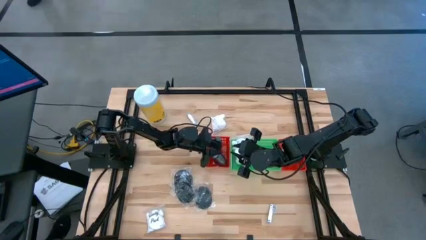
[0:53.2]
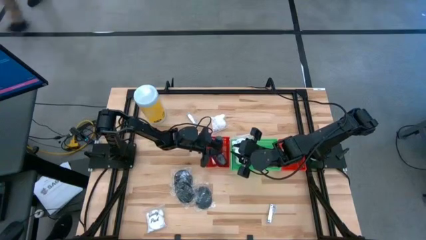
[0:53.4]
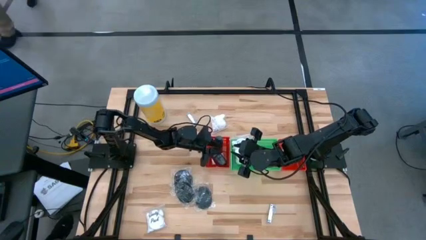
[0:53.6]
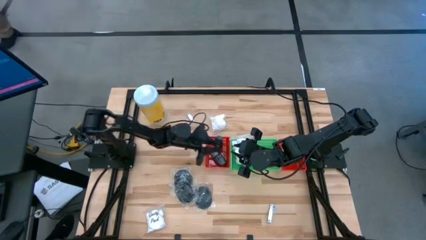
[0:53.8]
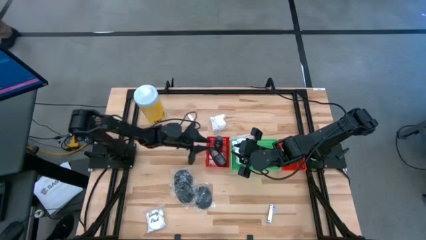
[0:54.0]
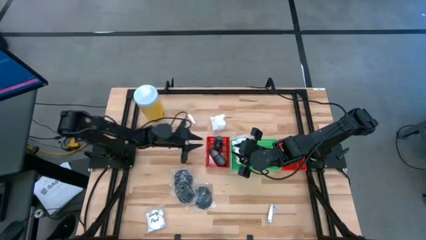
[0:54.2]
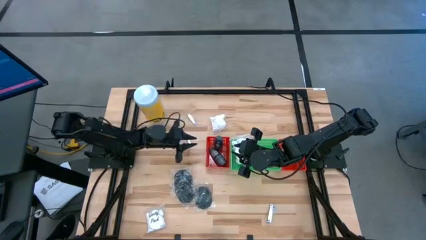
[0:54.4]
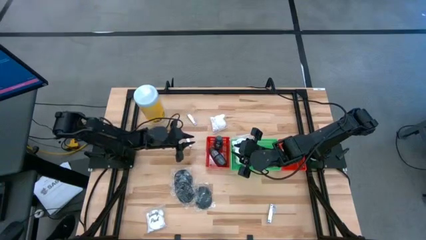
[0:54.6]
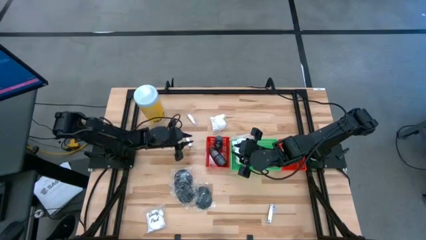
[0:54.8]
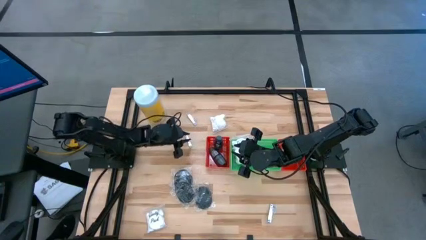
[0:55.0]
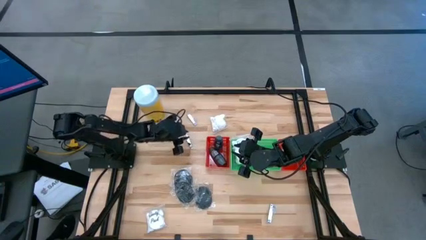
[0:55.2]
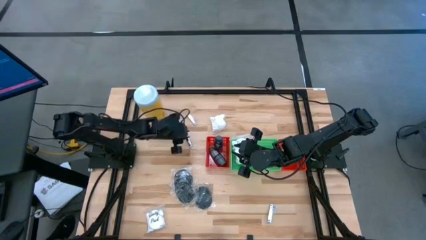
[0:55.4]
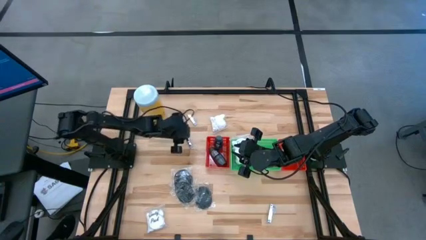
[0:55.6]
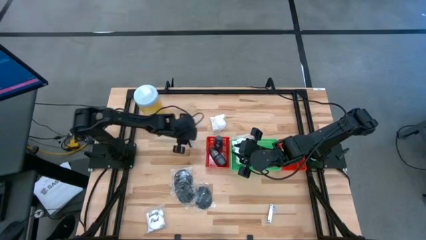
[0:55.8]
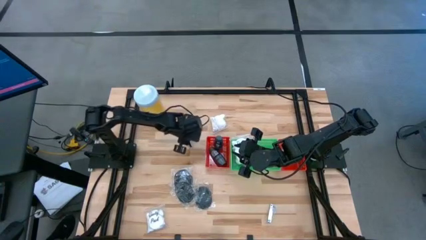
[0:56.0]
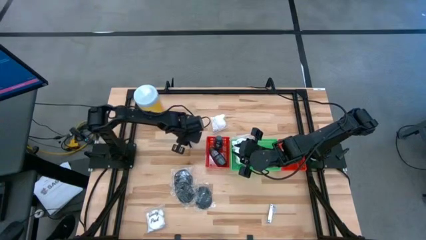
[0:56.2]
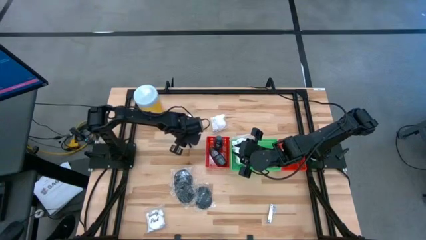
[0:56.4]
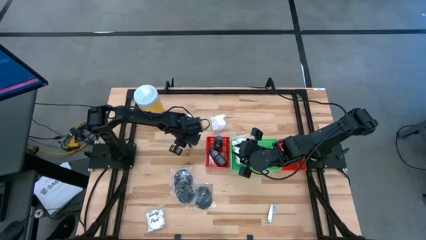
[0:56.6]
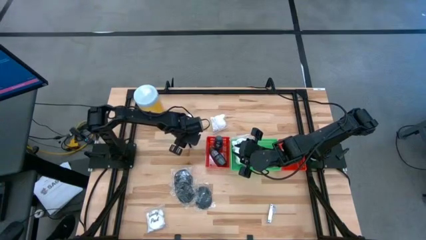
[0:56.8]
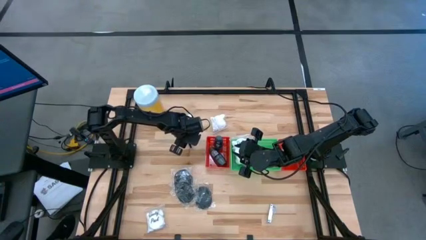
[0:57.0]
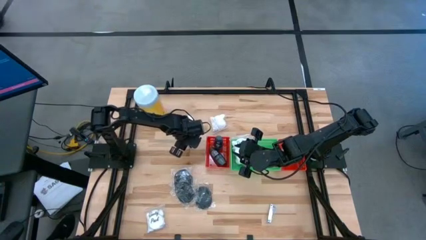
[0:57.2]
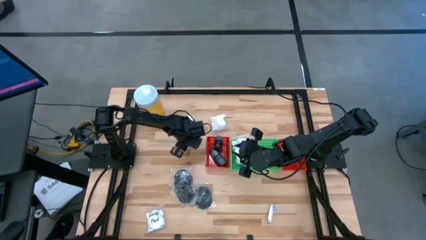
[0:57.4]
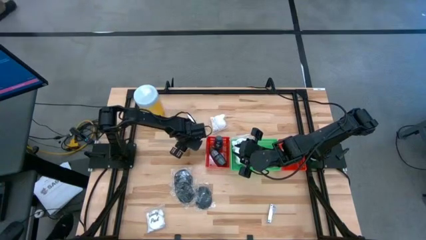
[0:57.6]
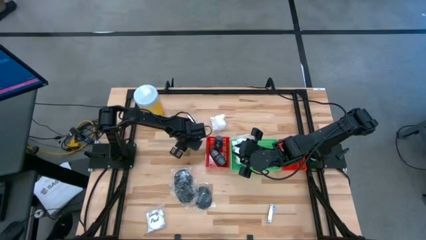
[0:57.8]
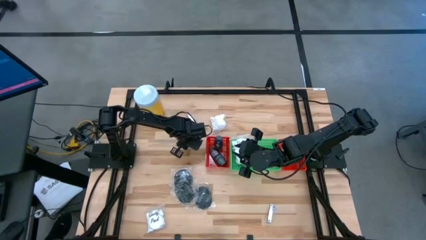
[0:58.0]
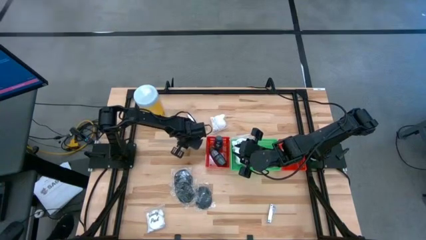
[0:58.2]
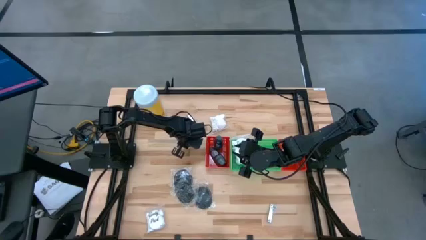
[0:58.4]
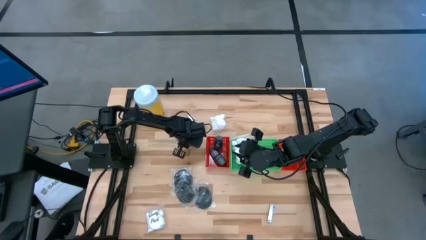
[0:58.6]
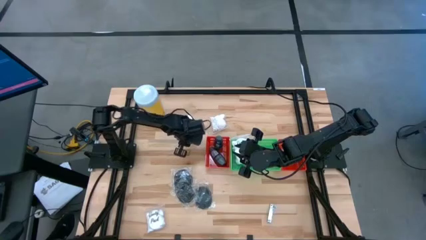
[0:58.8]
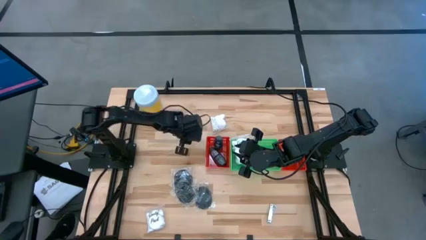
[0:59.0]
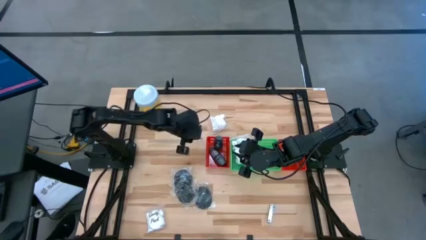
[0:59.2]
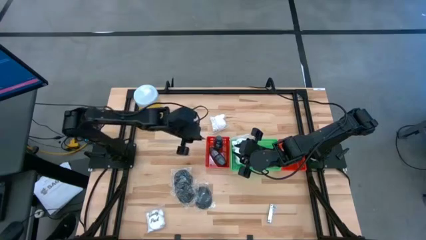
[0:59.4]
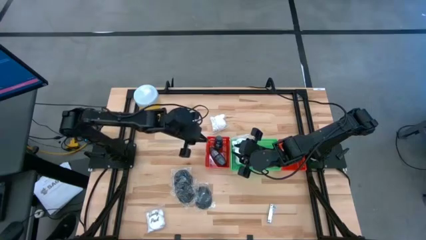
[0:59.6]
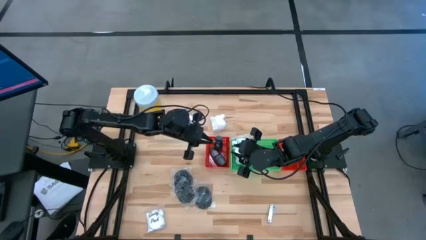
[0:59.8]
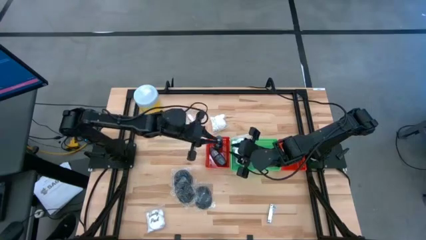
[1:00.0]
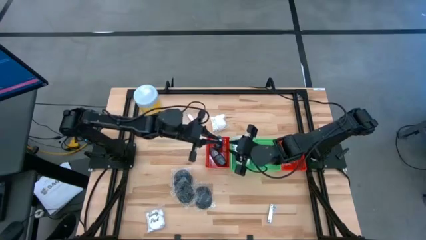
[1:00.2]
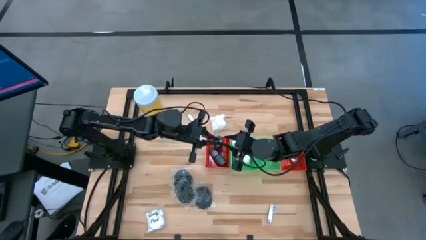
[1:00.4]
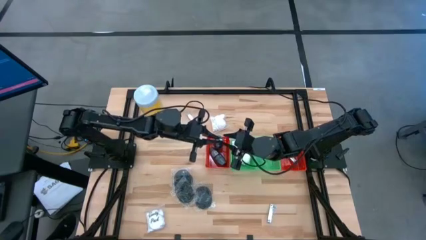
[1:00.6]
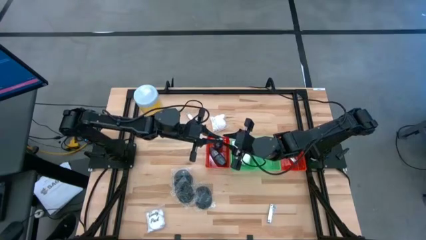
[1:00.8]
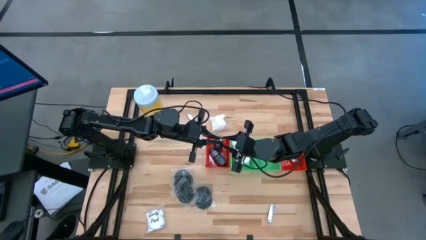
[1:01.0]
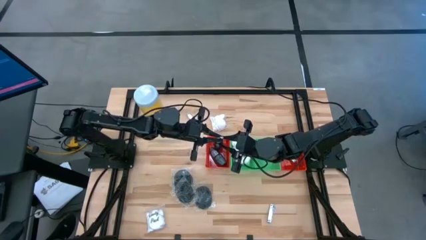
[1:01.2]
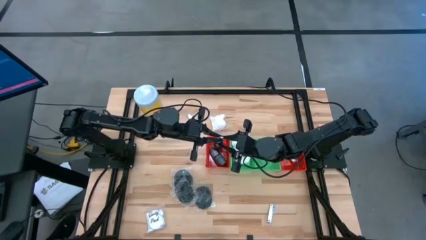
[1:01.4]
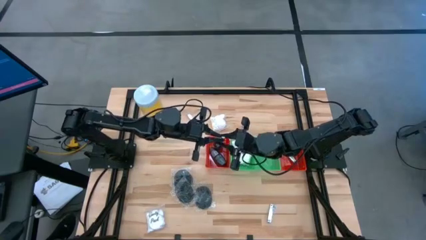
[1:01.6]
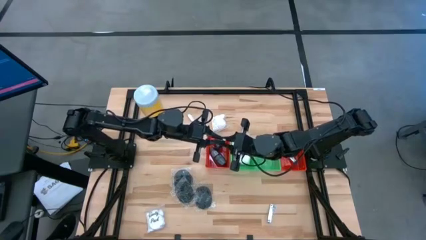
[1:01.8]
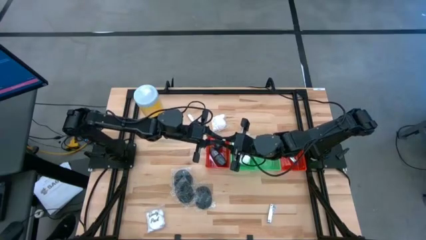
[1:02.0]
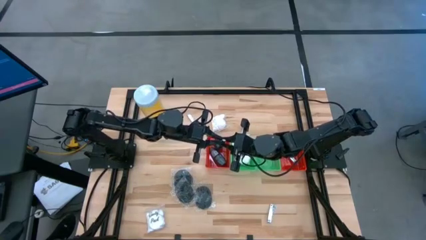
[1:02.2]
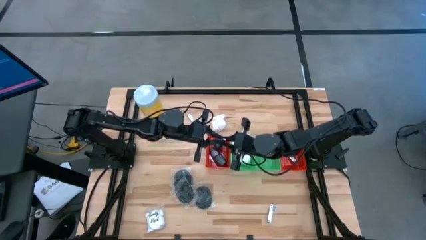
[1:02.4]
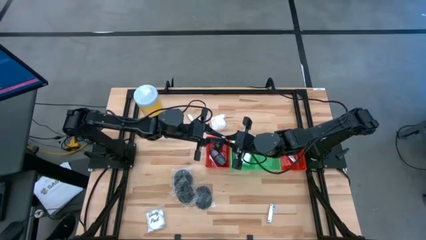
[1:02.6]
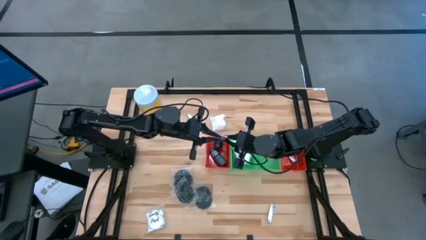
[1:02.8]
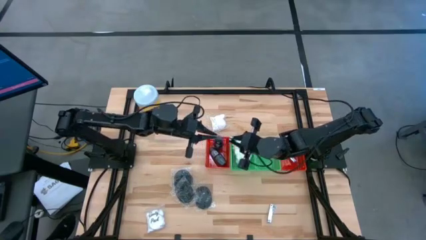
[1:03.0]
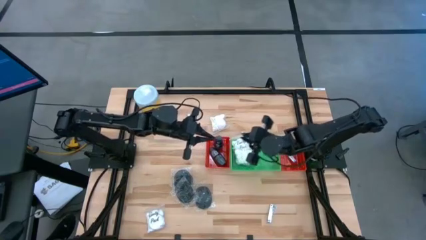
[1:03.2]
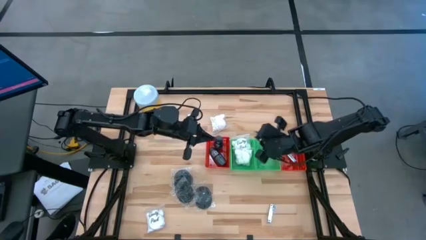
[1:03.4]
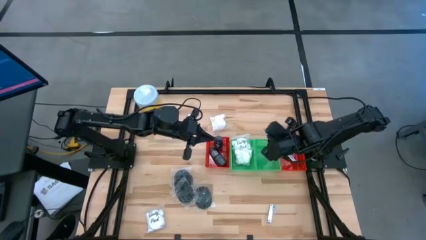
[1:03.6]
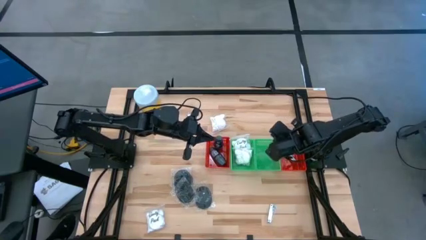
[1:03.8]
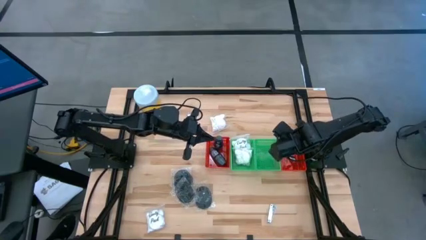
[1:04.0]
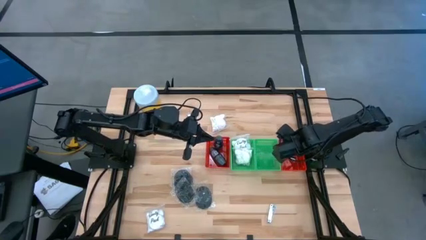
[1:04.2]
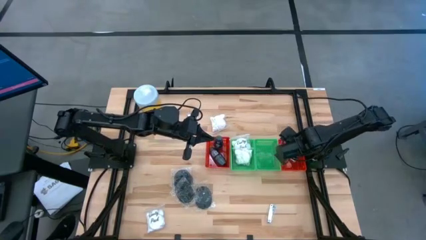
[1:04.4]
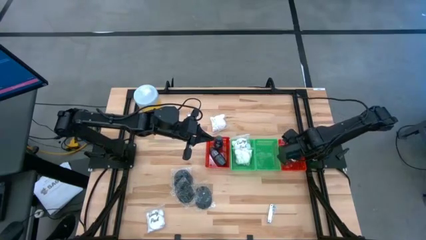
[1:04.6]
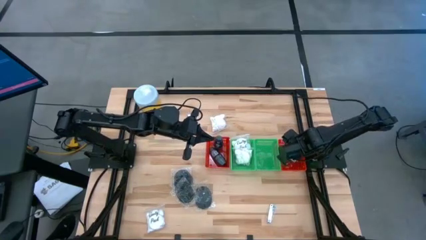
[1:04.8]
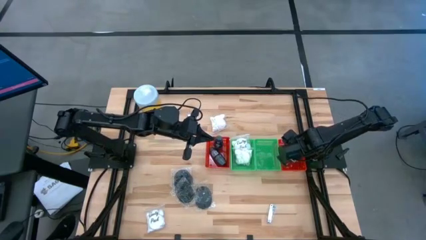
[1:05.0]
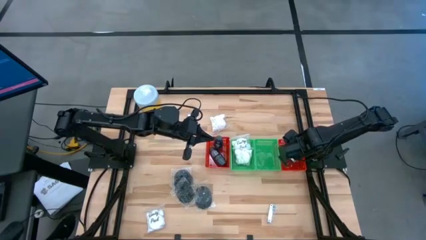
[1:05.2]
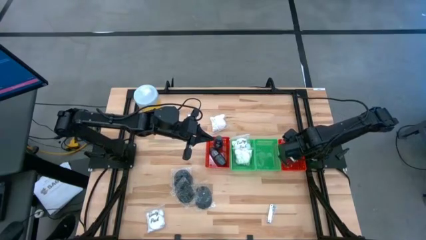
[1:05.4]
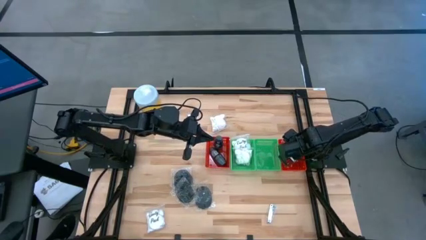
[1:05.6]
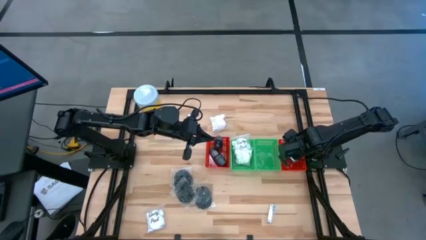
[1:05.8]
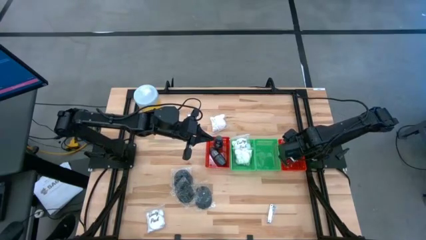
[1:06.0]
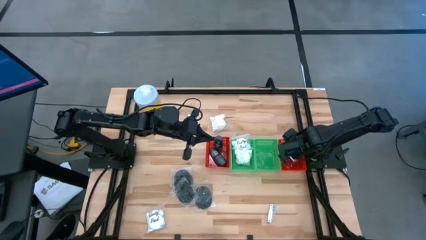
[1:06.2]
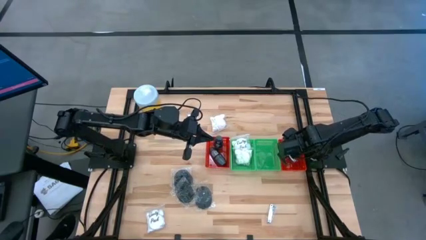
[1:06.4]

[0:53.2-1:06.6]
Task: Pick & Place Travel size toiletries
Put the silver nail cutter into the right red bin

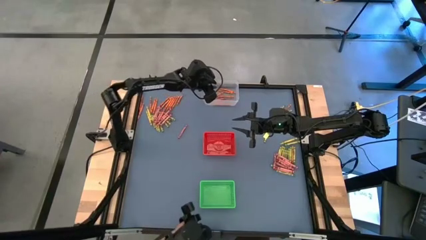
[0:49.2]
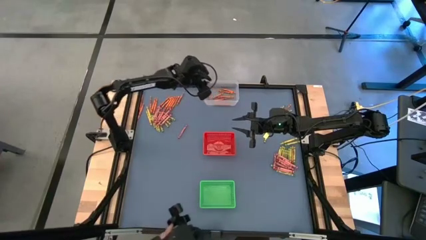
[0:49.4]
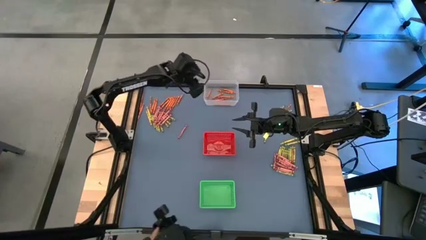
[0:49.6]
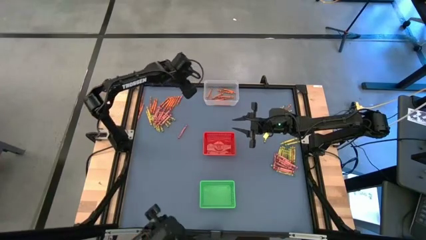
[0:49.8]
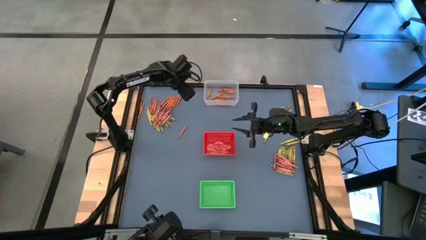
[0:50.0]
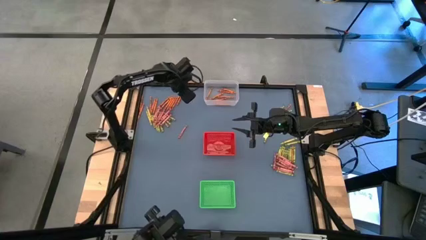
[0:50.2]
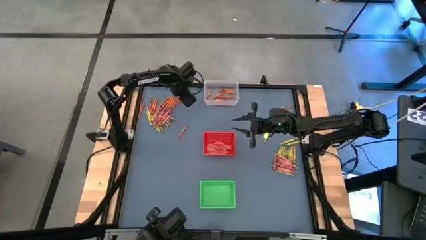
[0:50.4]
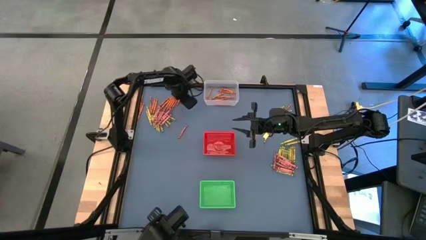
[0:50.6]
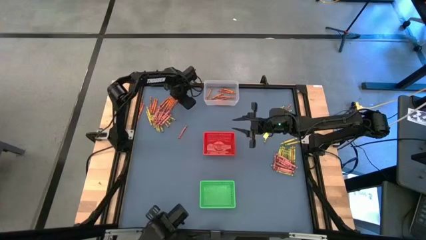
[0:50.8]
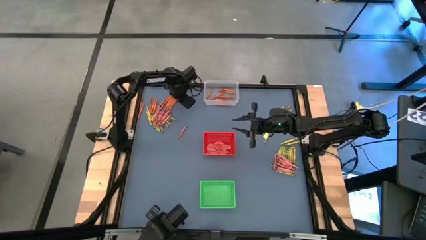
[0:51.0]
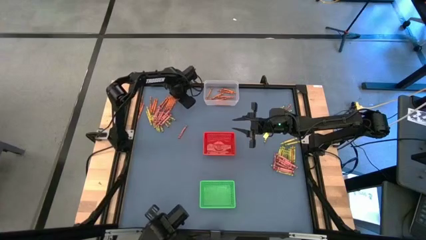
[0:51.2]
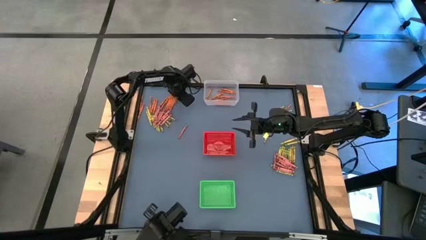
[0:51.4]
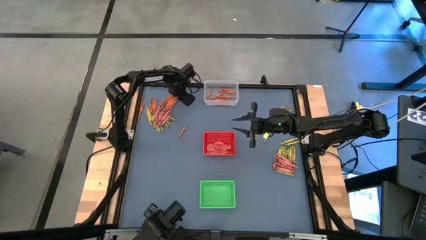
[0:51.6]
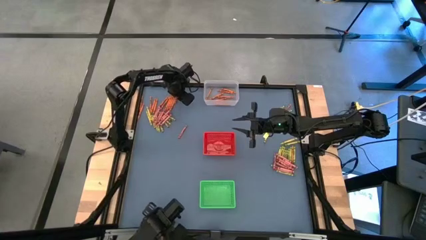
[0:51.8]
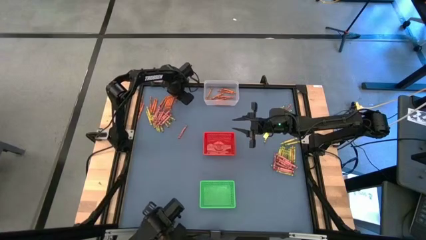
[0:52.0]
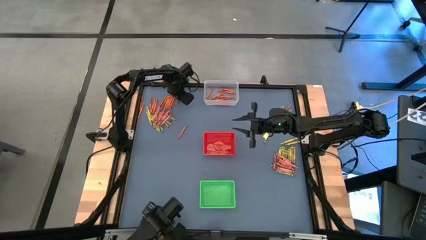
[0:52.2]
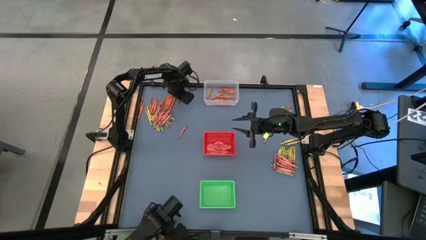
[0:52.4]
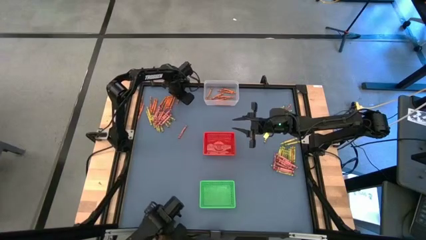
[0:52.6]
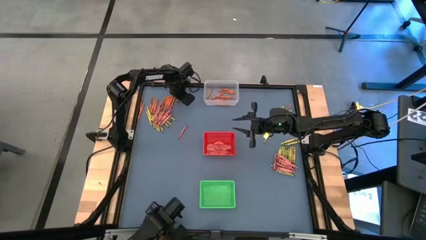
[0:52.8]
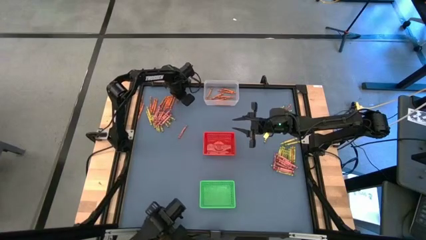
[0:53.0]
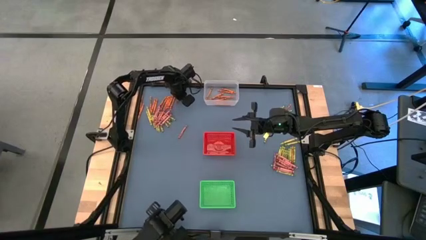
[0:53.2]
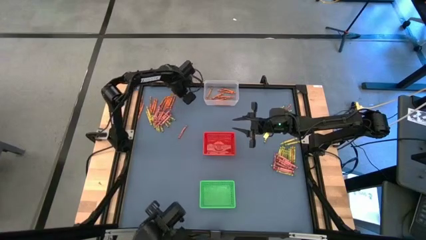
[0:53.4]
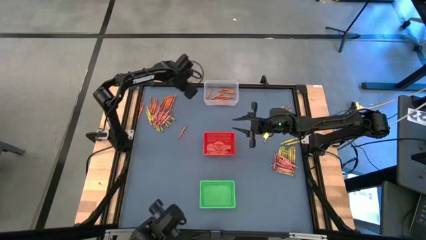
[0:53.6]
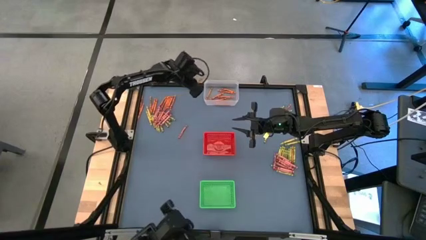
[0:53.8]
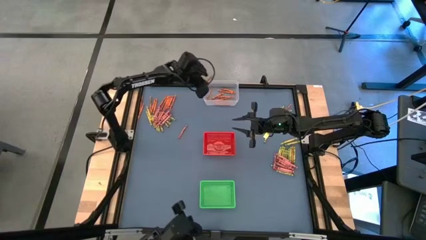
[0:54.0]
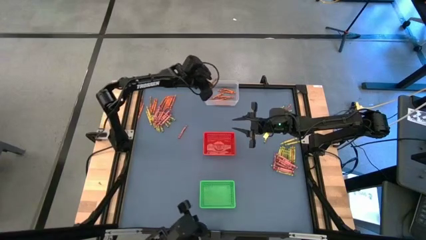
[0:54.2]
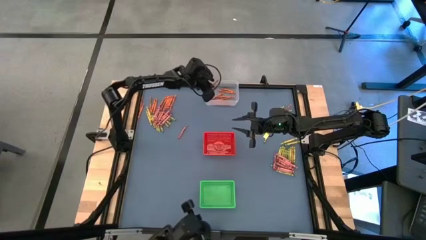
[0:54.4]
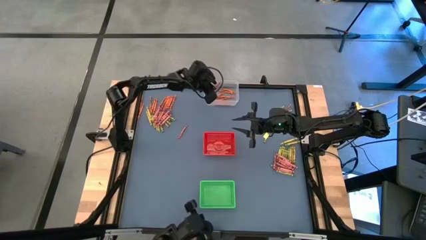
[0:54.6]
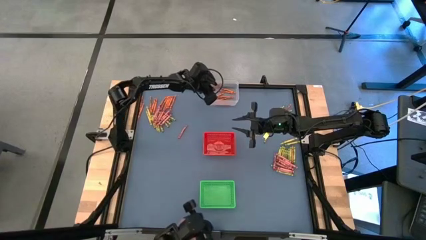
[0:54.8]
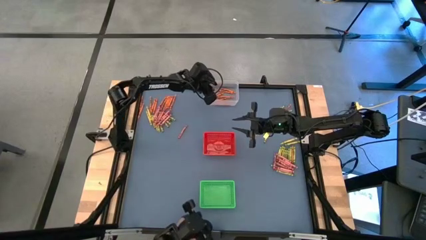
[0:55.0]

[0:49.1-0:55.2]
Task: Sort crayons
Put the orange crayon into the transparent bin
